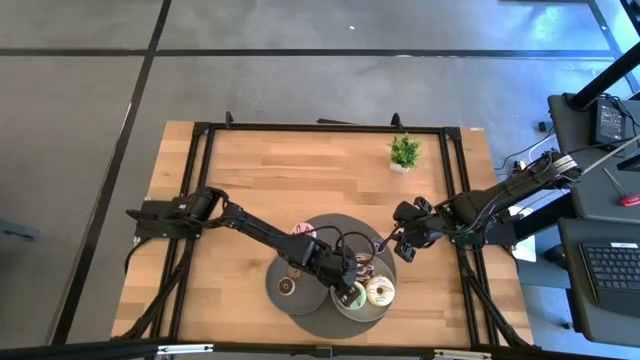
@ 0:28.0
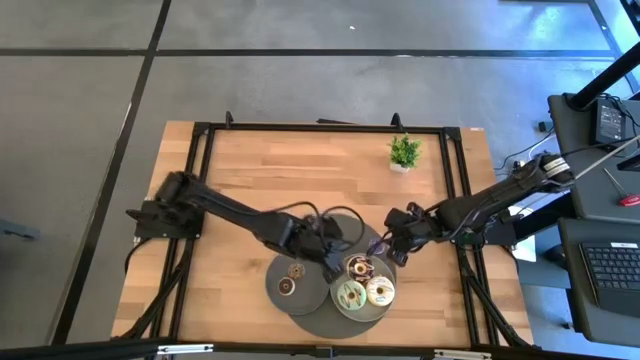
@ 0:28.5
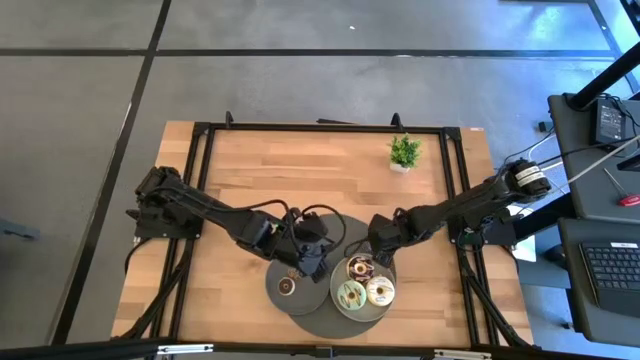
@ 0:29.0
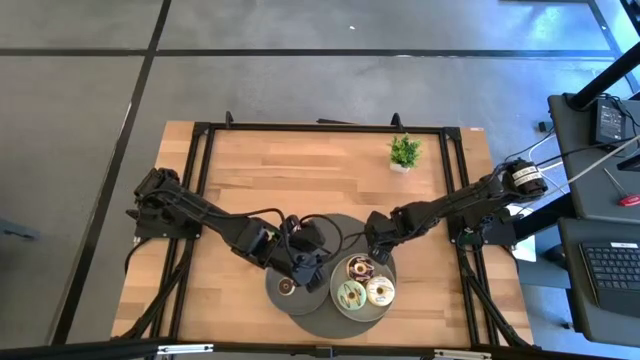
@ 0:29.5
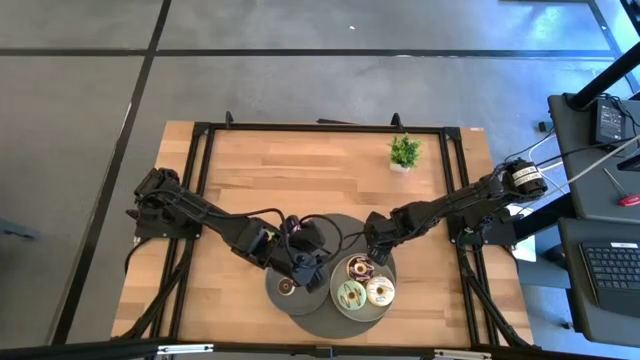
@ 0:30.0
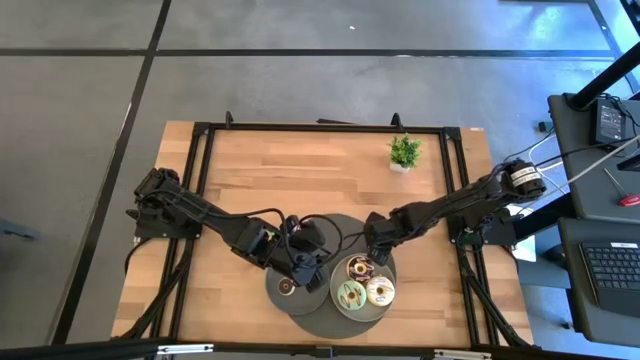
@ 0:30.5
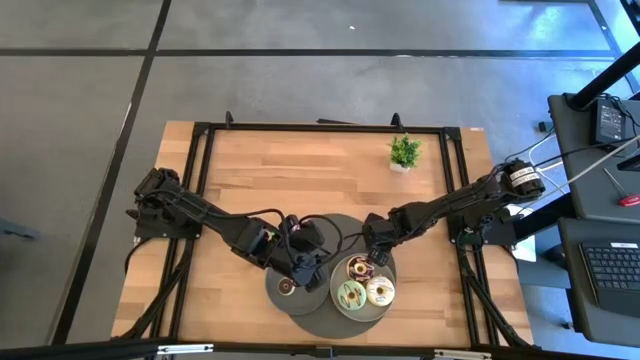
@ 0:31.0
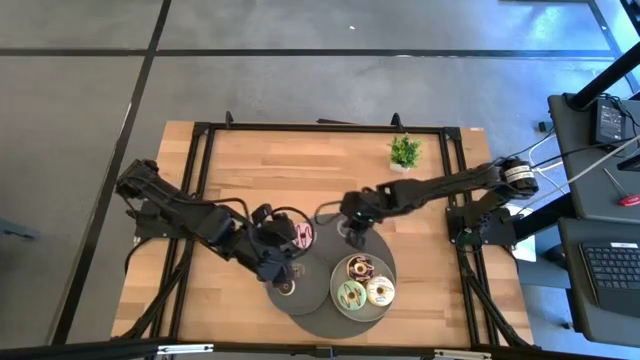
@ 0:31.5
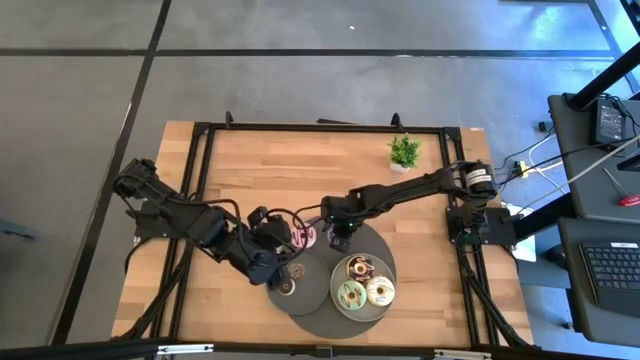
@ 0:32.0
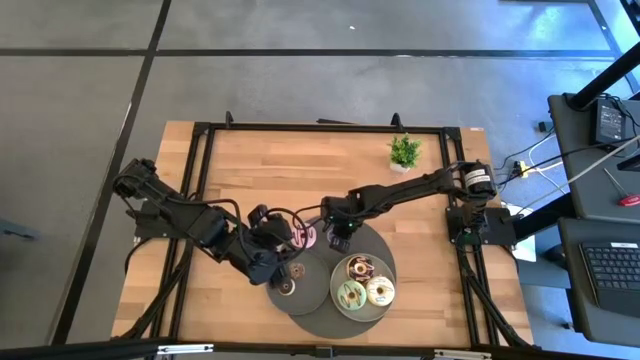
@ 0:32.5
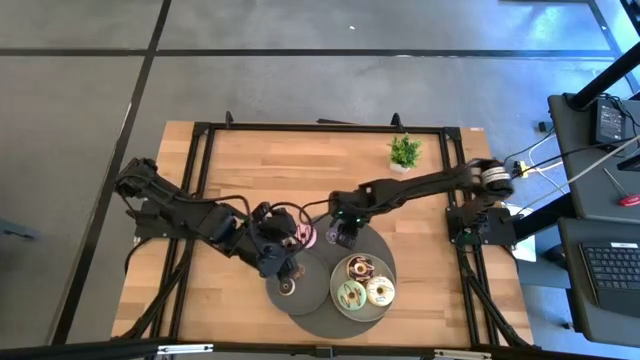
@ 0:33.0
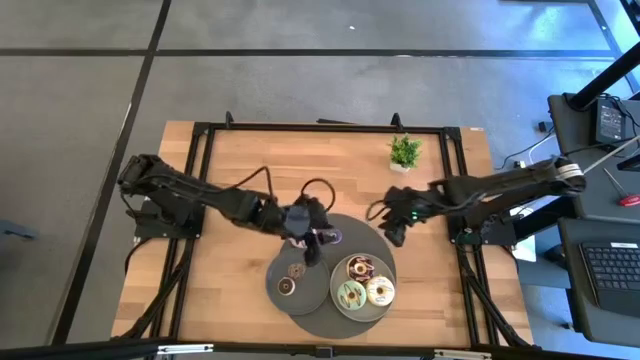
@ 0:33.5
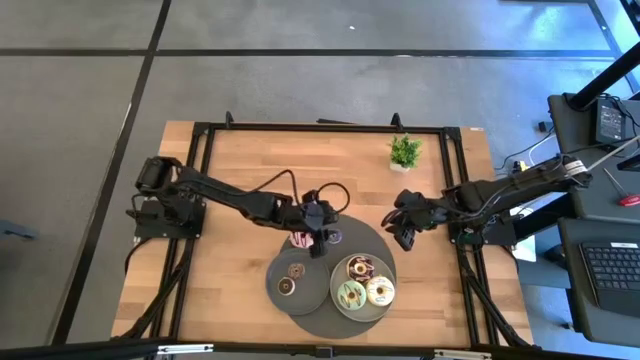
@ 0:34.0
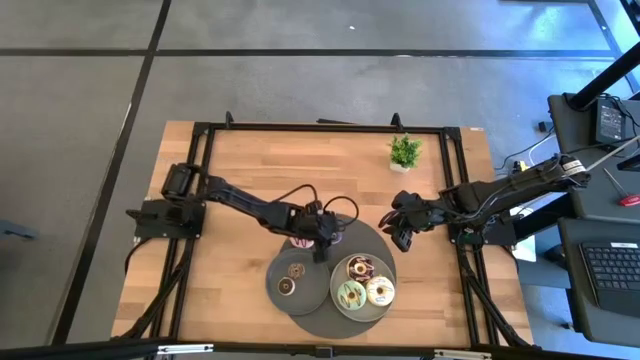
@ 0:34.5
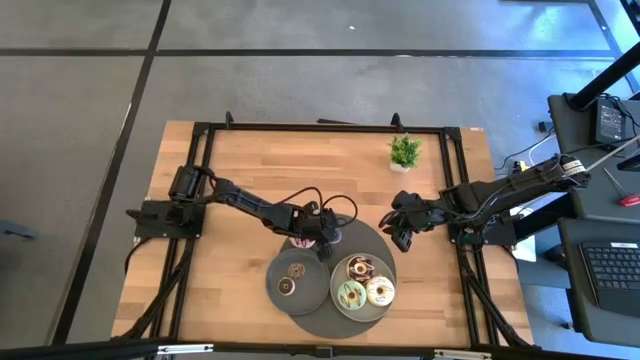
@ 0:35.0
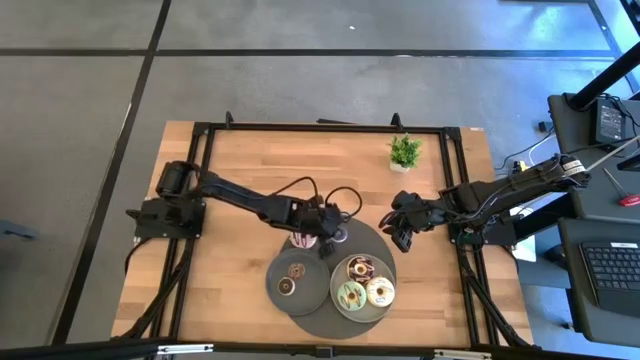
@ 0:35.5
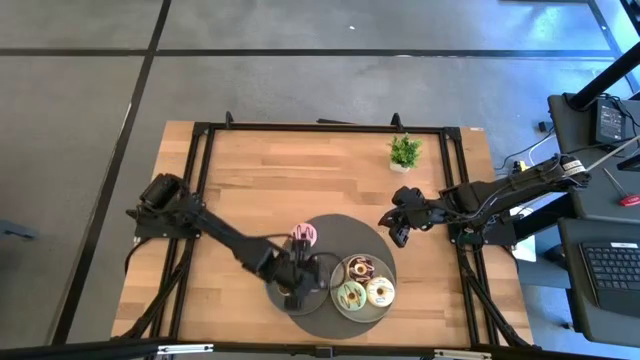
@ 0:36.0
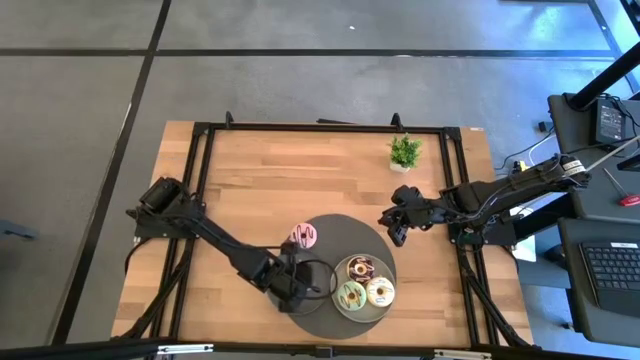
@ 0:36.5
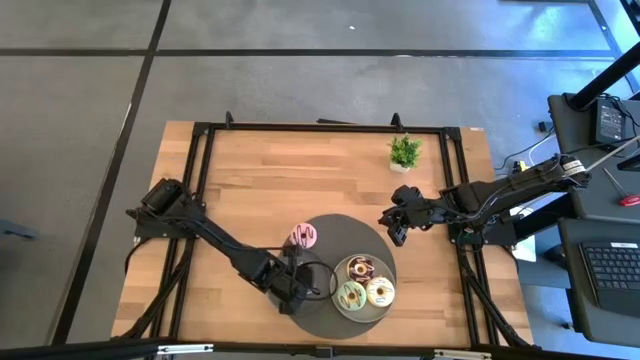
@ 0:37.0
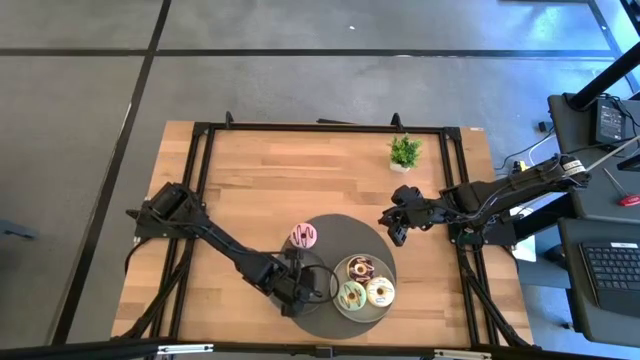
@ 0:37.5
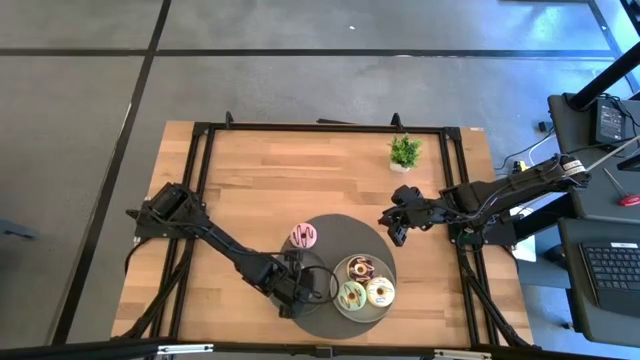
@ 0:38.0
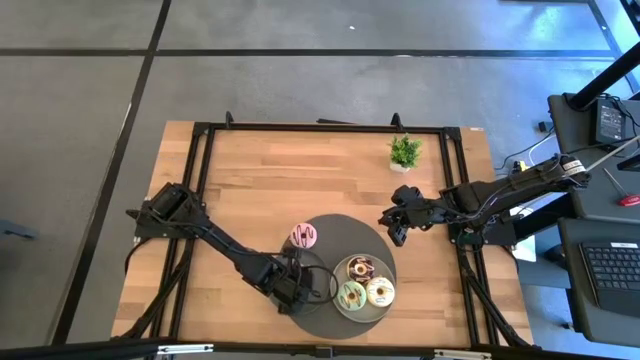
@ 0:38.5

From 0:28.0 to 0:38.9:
Task: Pick & Place donuts
Put the small violet donut on the black plate

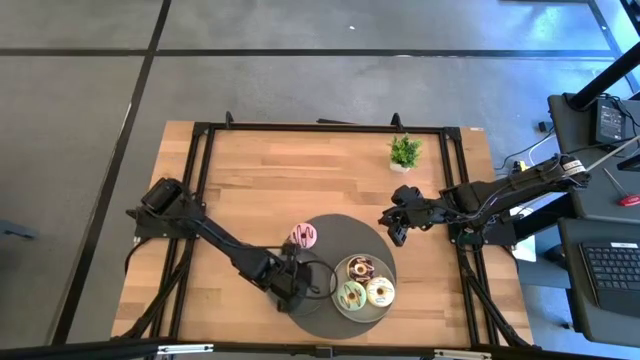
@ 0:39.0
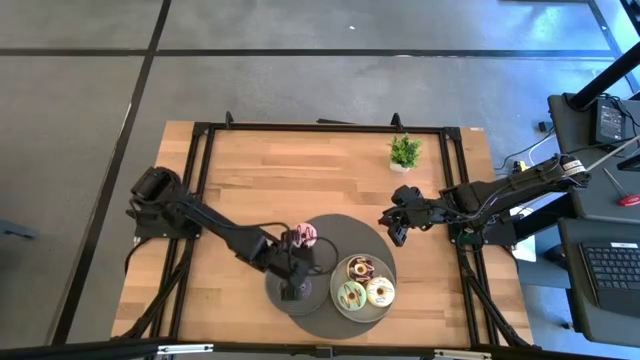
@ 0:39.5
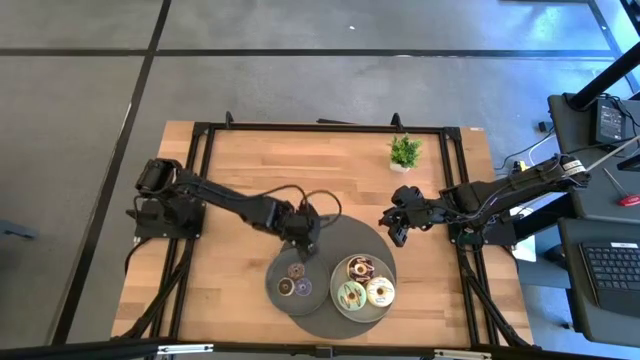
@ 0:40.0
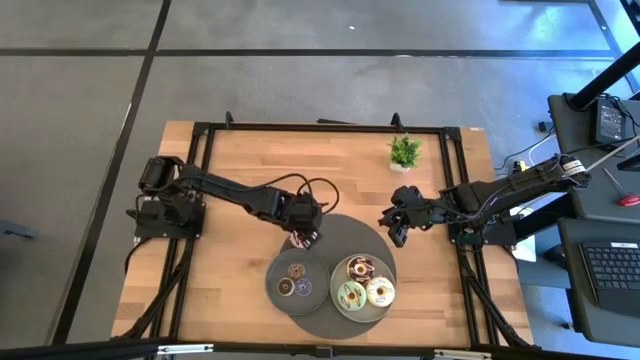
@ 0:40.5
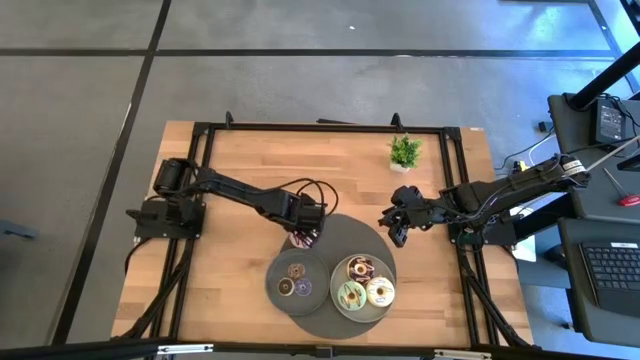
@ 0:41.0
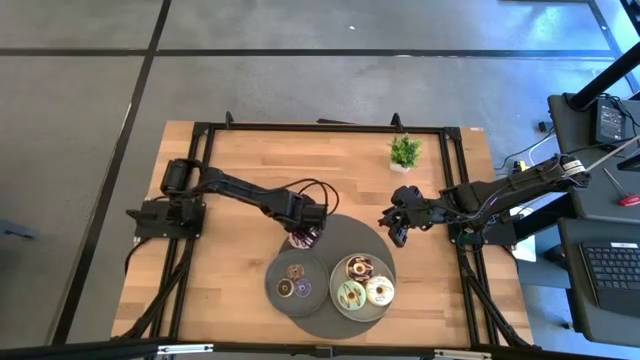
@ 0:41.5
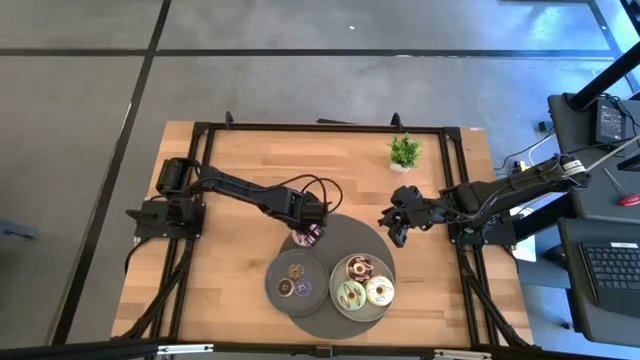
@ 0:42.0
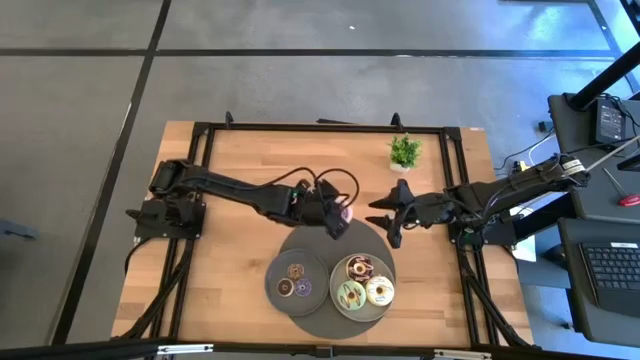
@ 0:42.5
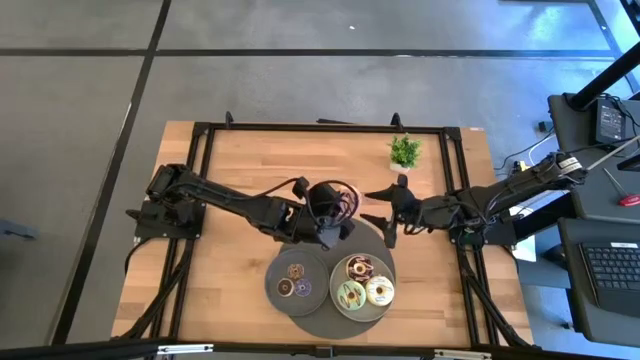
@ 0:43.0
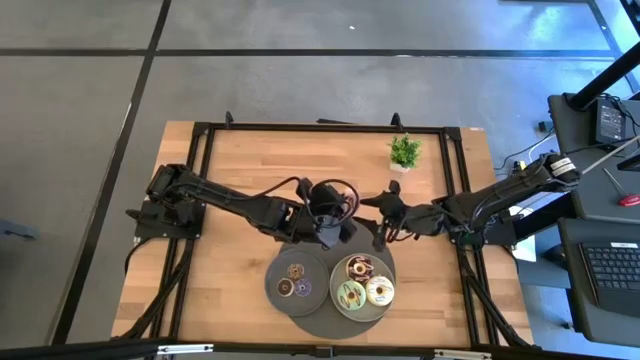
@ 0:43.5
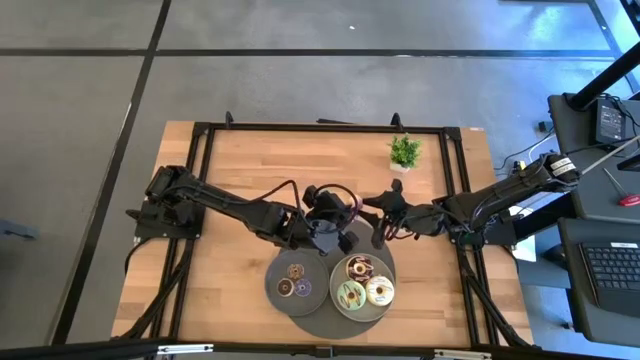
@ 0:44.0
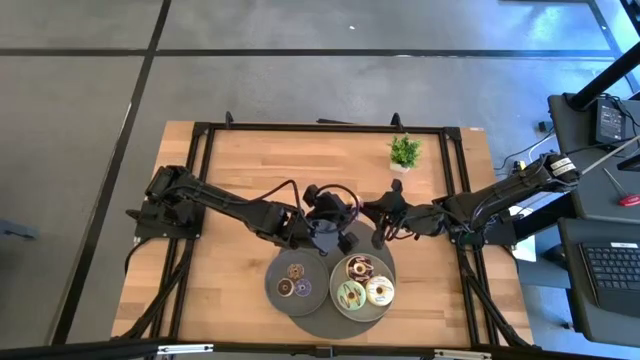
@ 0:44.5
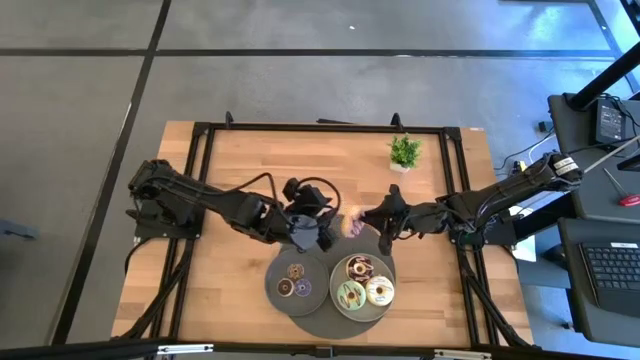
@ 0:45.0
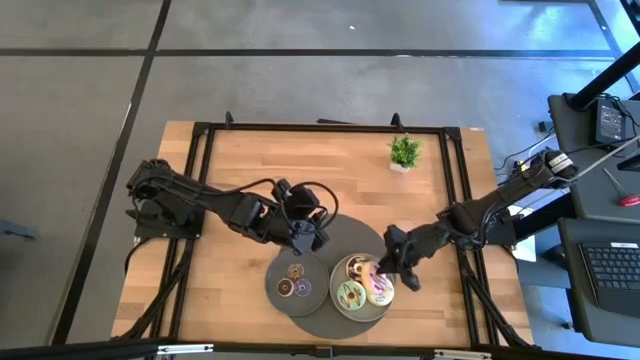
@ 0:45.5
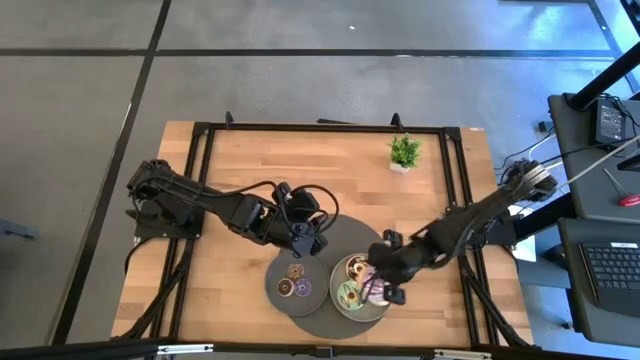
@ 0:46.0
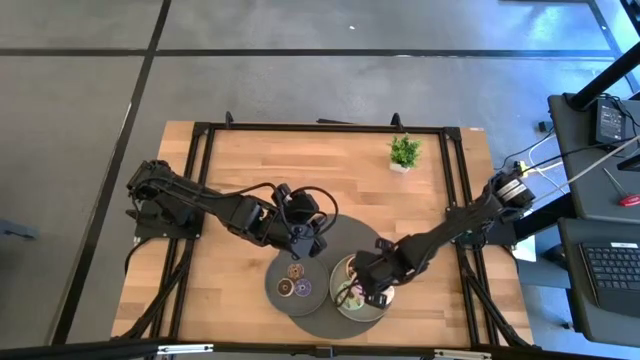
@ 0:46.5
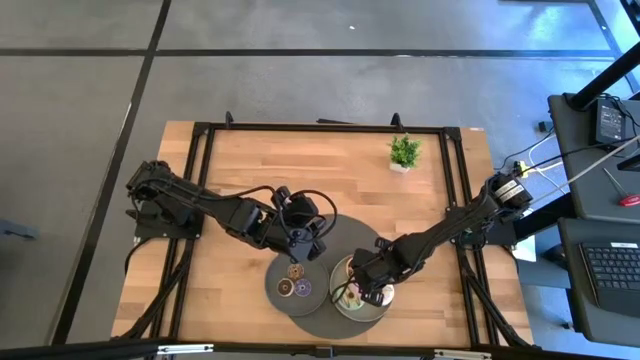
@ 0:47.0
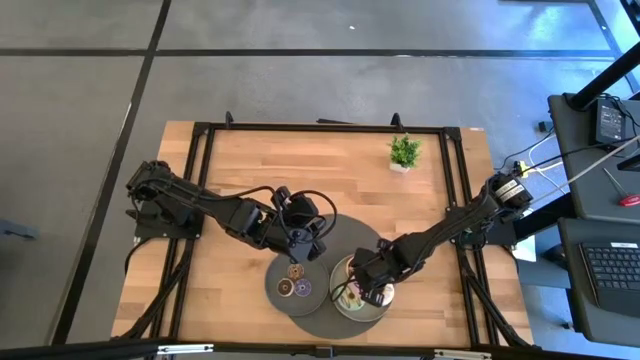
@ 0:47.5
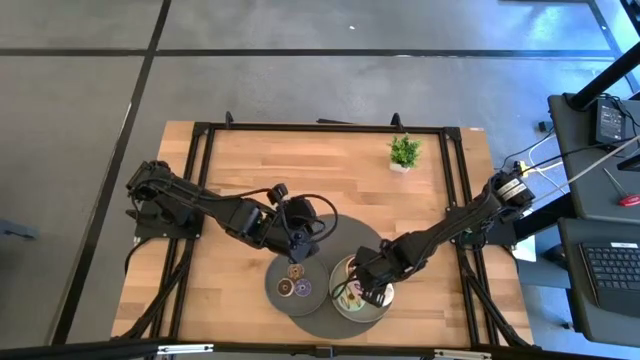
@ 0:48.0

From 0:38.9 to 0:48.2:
Put the large purple donut on the gray plate
